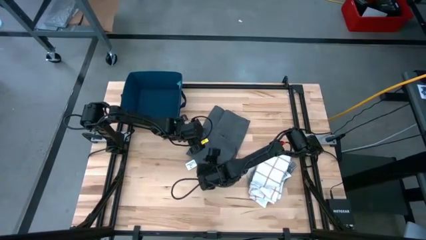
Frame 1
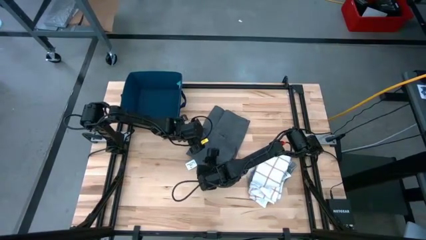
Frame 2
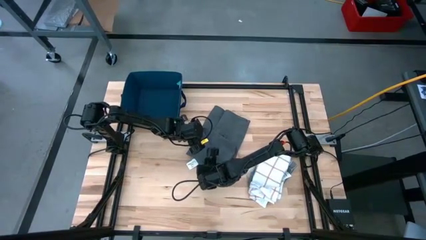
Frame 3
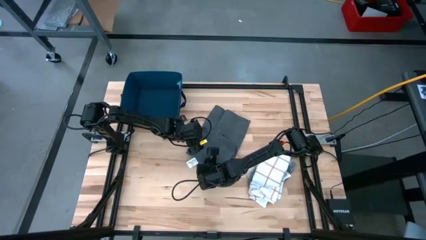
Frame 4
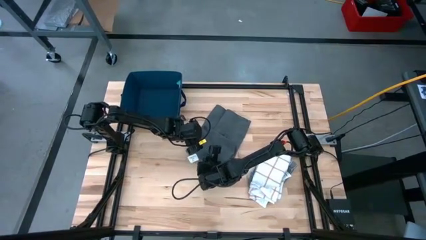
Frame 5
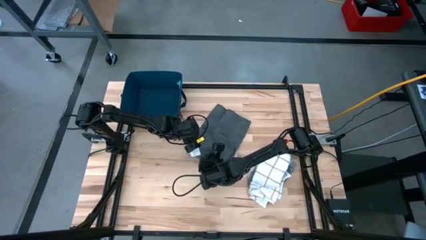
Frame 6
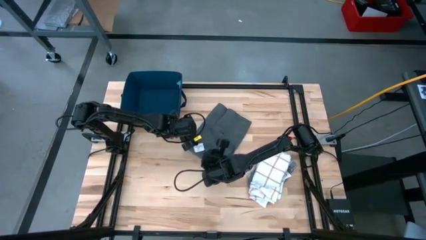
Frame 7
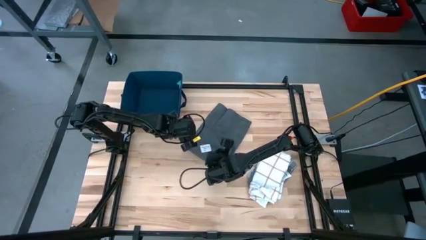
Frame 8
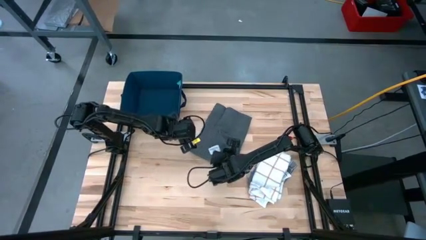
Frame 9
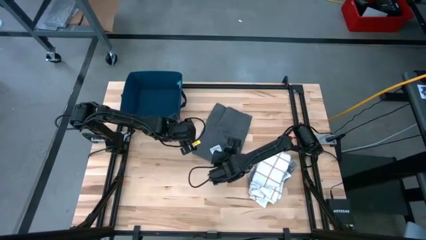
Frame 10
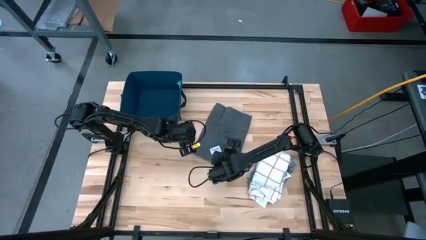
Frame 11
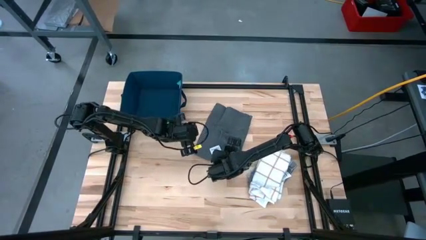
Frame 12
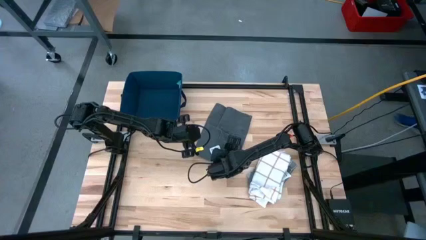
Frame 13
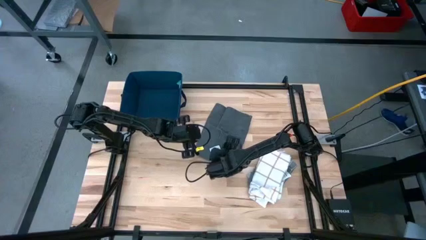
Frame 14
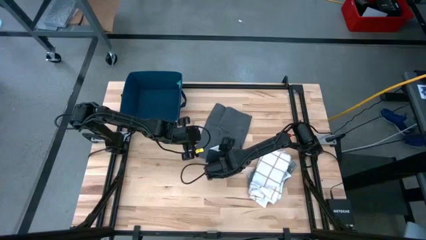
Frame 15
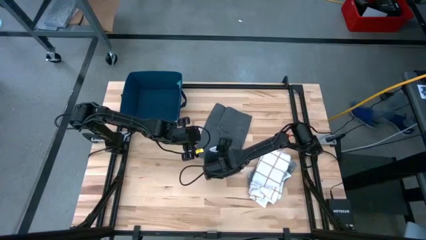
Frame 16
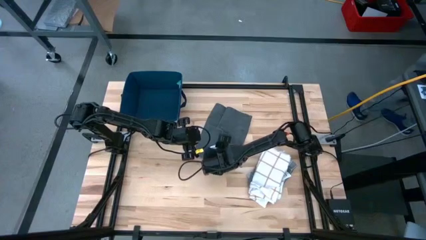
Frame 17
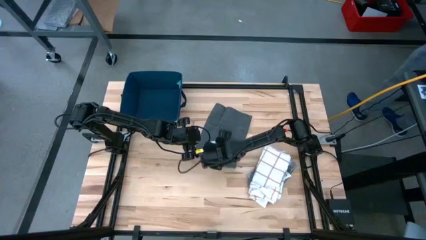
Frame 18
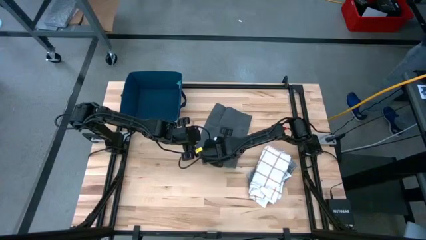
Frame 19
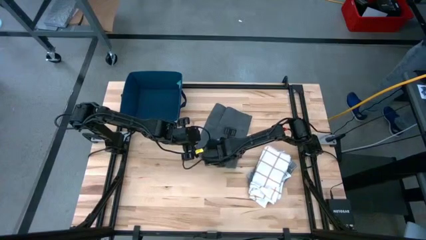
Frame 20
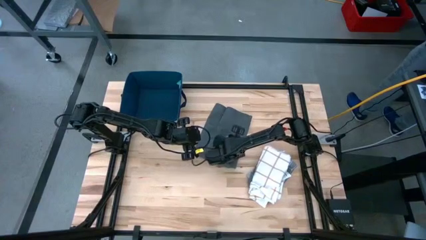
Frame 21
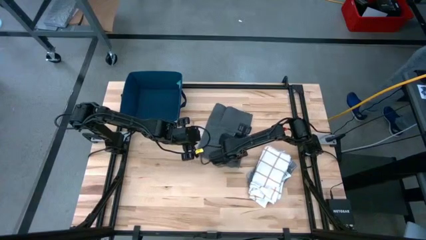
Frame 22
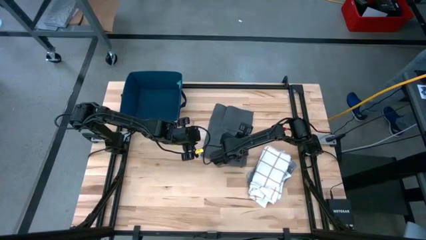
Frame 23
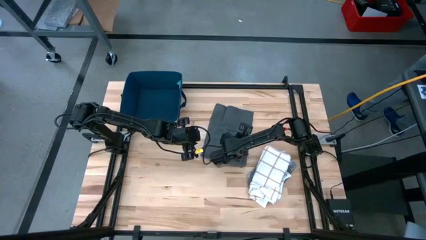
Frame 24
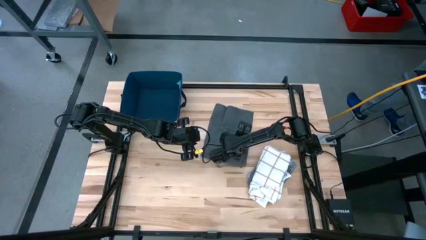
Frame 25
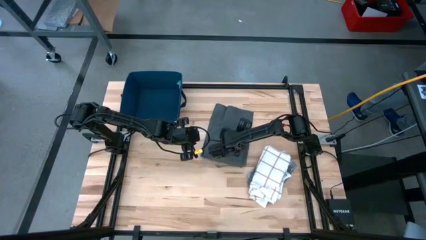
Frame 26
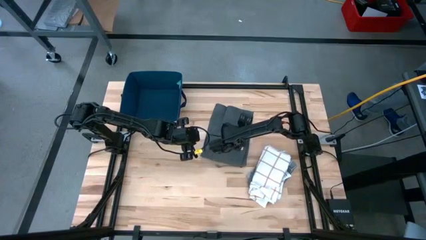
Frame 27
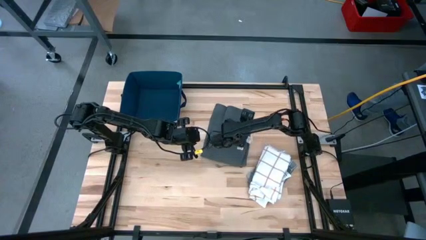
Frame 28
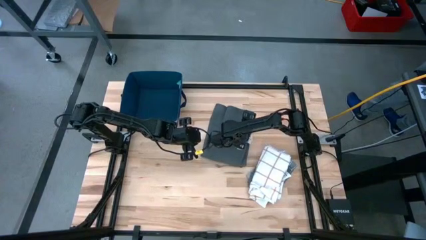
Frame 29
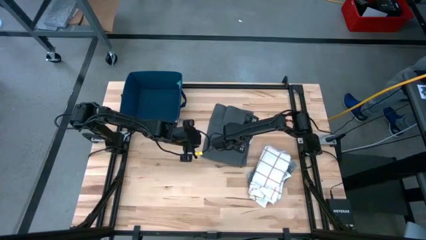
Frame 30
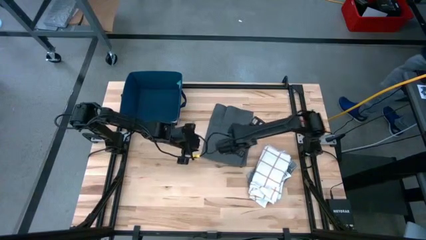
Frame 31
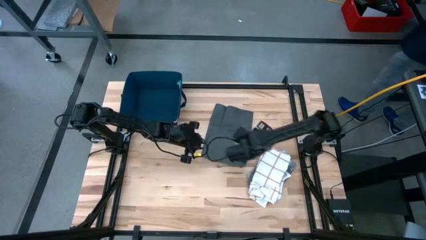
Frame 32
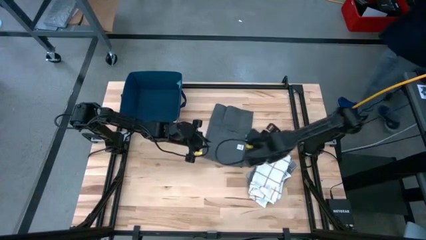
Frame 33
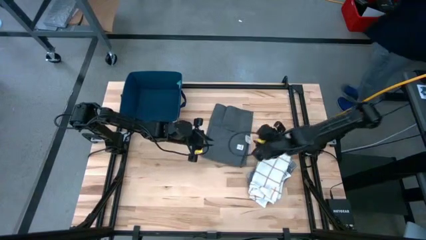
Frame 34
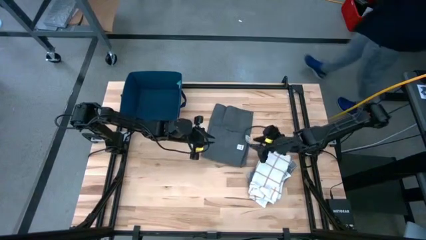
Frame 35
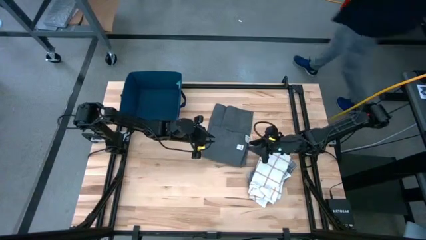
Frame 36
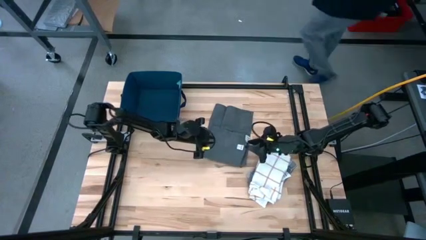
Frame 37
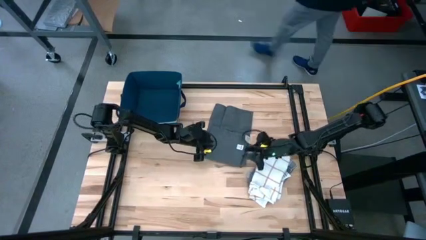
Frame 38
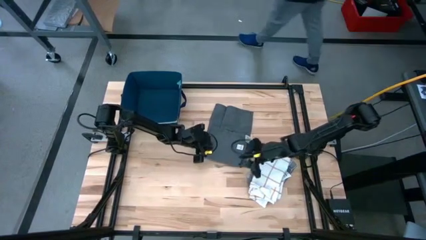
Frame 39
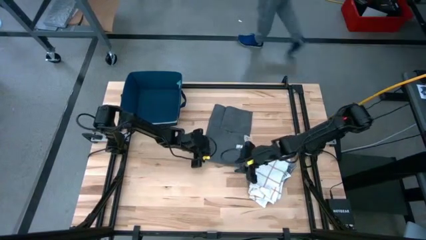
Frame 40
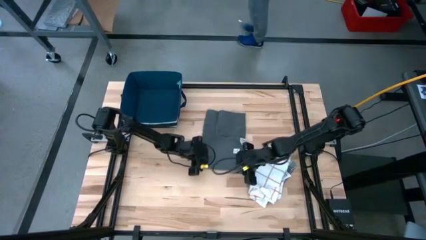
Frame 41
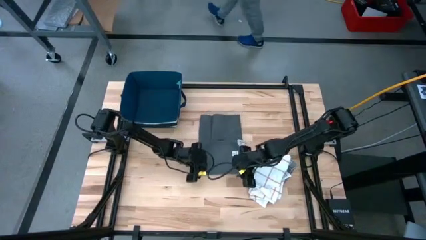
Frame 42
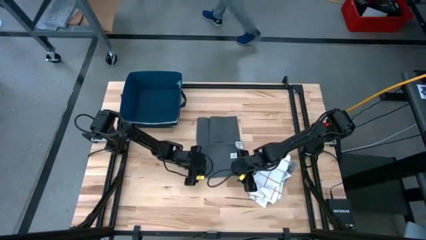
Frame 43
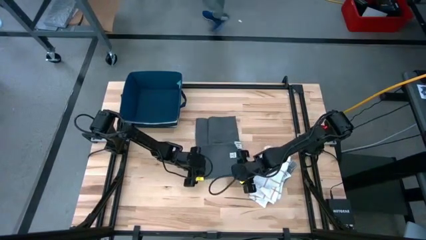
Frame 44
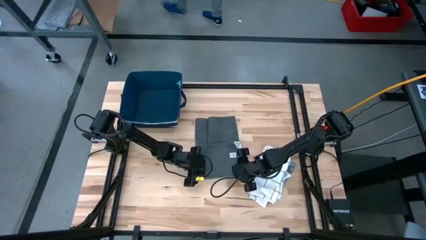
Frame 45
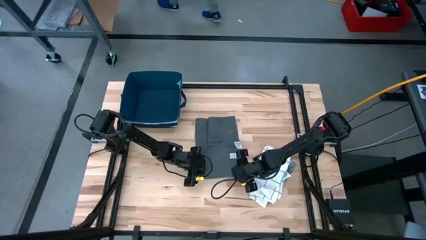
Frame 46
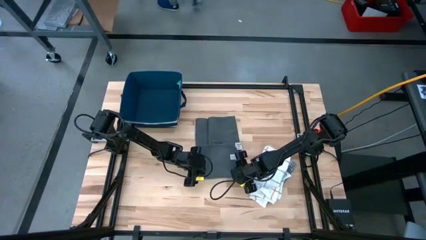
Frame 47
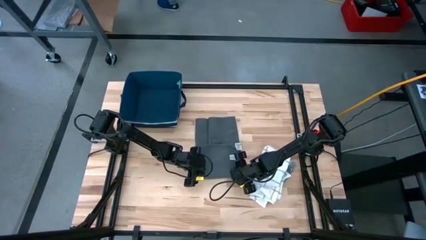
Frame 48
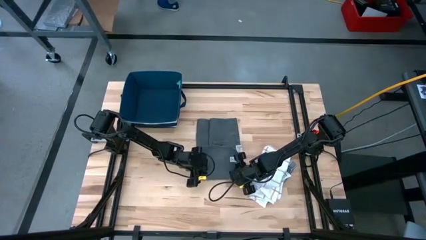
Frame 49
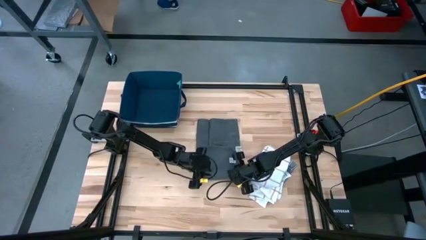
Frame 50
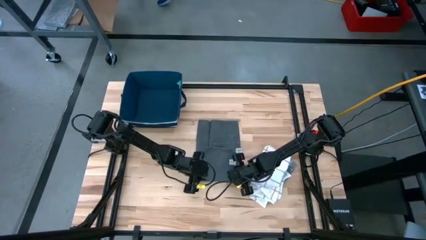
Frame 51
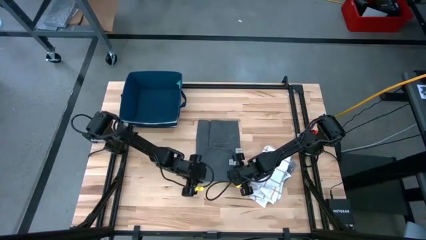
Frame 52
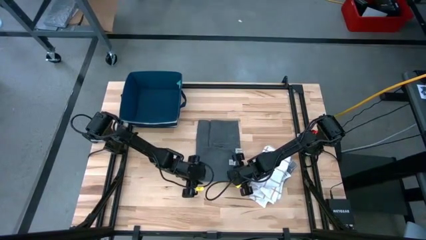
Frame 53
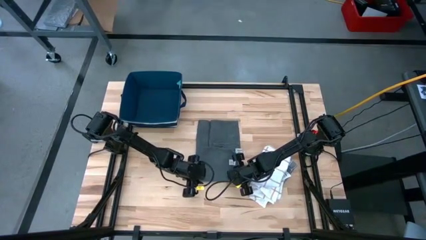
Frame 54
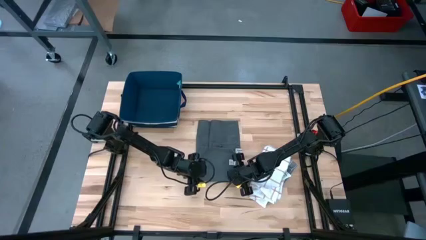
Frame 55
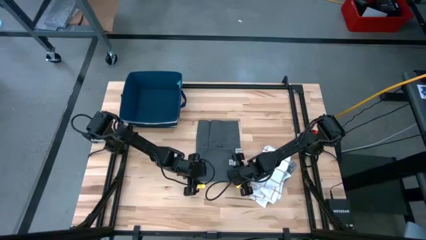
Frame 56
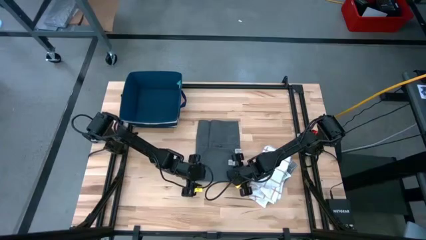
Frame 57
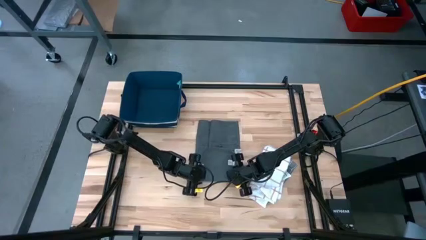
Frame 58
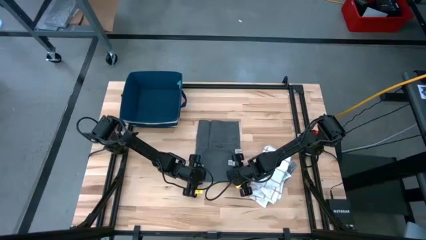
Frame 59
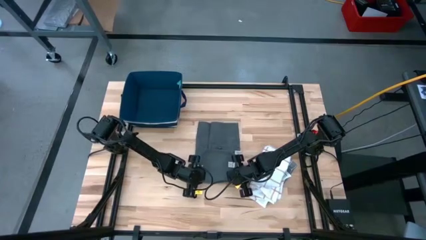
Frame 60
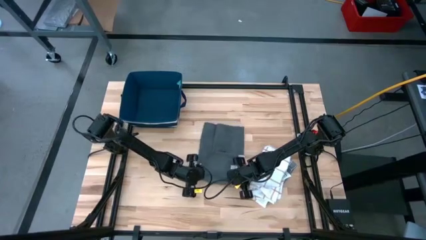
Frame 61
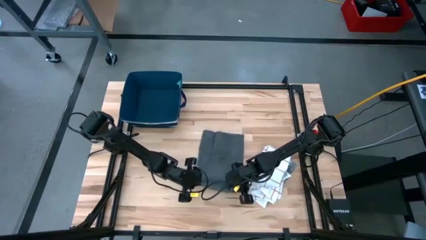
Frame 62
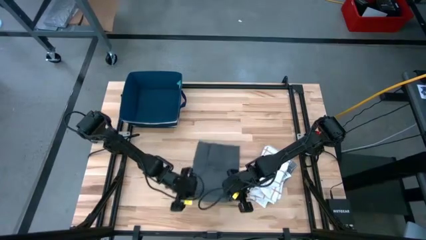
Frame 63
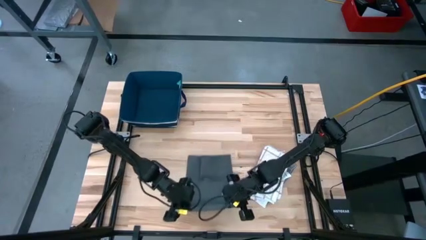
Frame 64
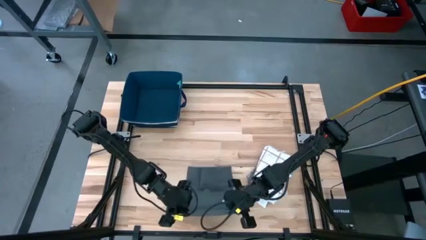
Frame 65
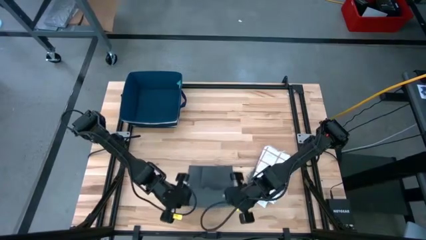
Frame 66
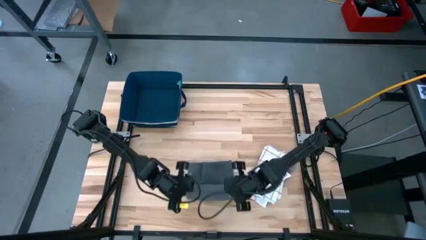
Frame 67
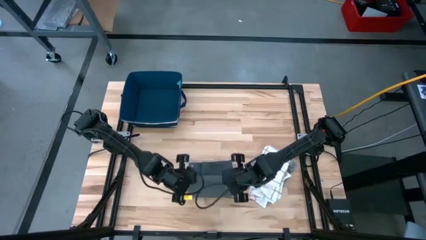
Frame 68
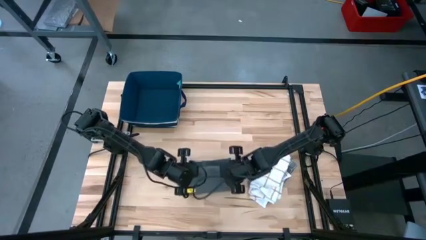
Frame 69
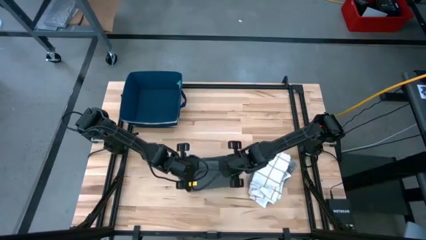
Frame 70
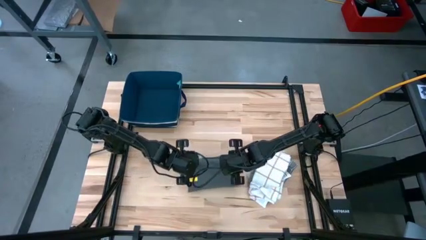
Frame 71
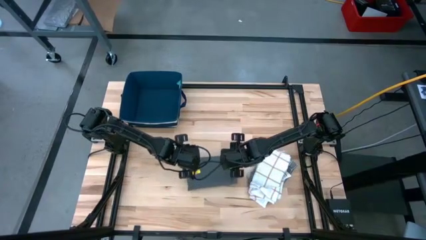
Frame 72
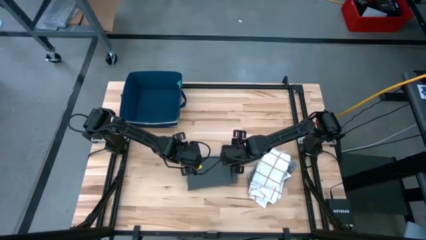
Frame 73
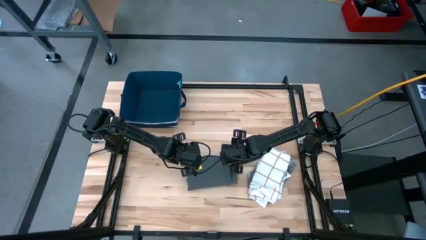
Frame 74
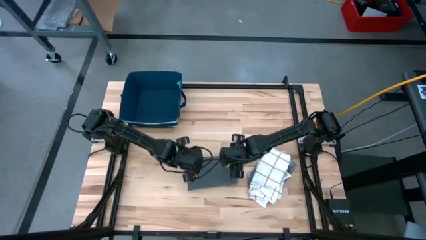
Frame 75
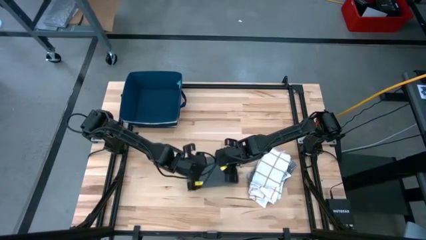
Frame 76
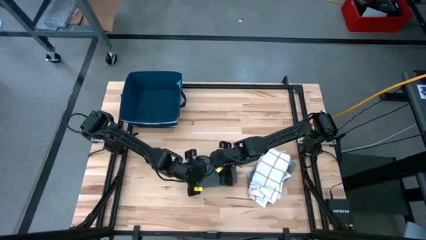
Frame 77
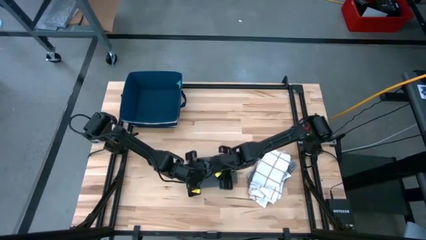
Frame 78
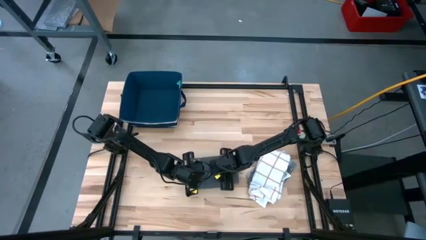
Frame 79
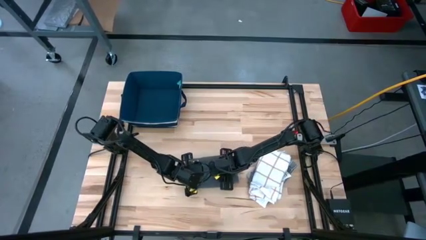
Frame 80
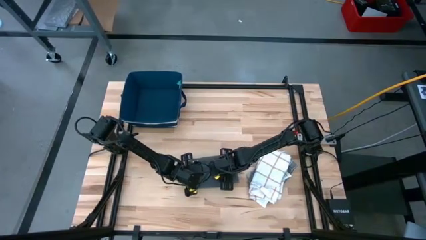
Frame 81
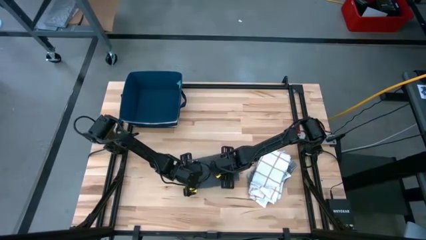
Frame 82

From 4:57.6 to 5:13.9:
Task: Fold towel
Fold the gray towel
